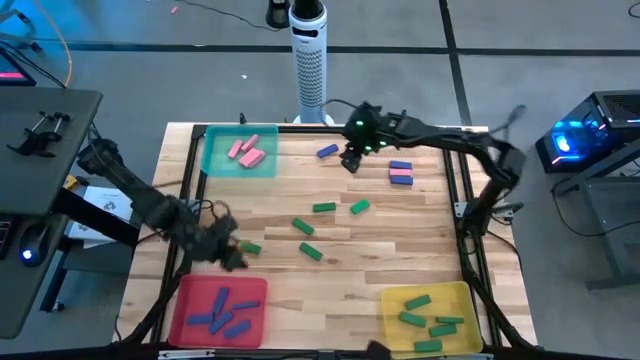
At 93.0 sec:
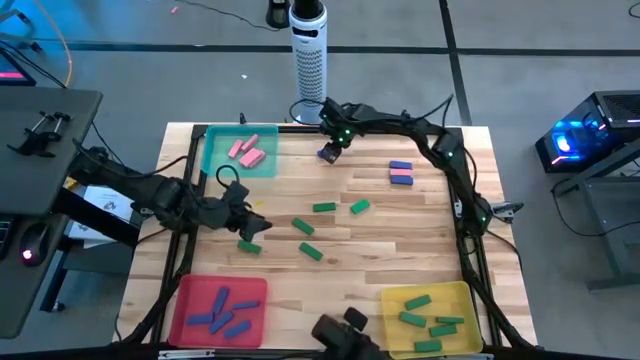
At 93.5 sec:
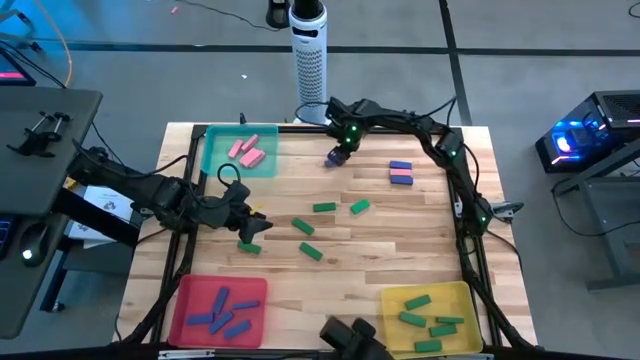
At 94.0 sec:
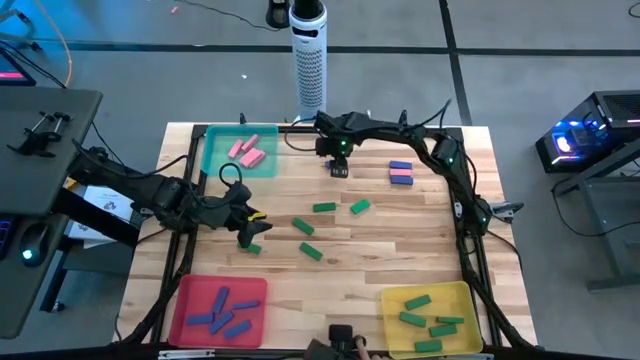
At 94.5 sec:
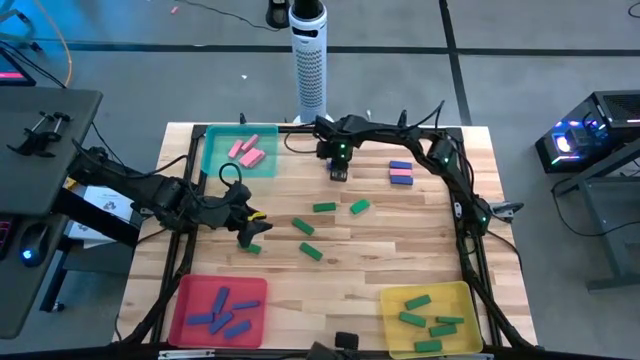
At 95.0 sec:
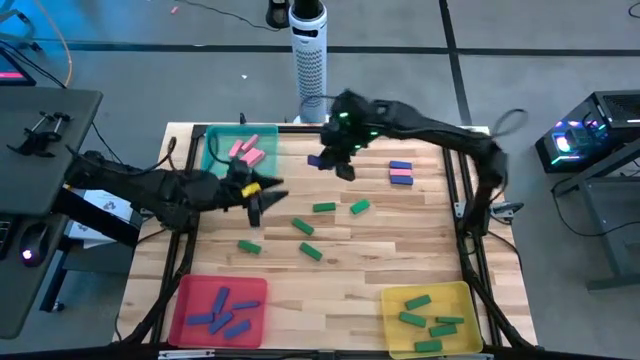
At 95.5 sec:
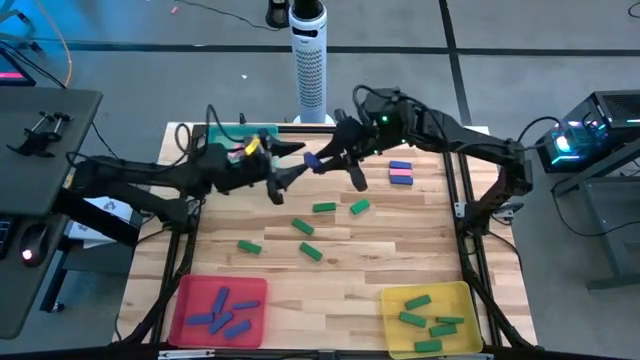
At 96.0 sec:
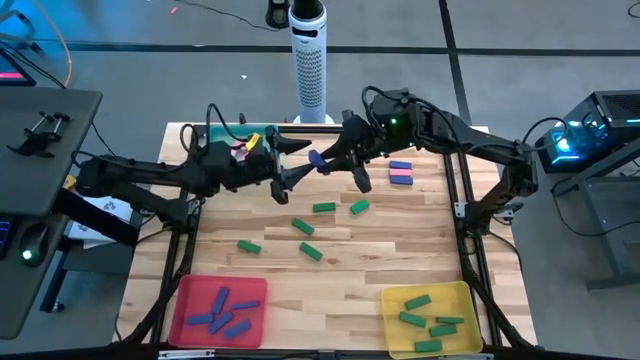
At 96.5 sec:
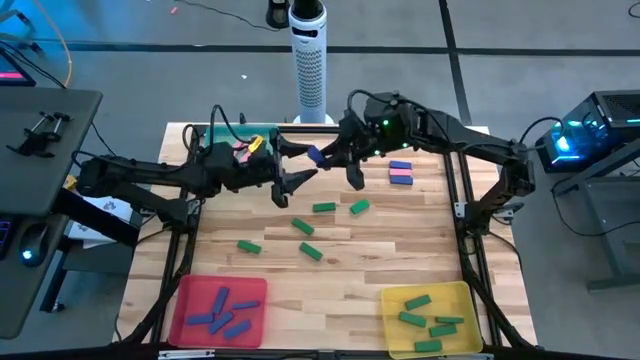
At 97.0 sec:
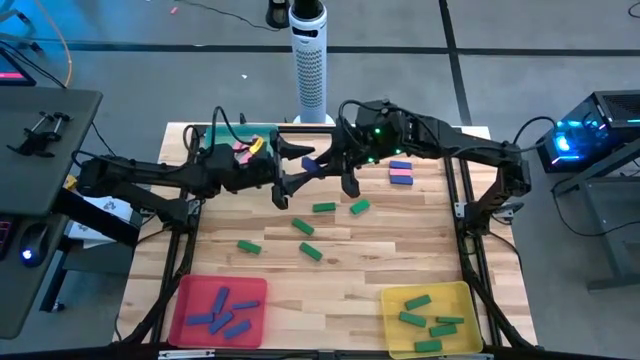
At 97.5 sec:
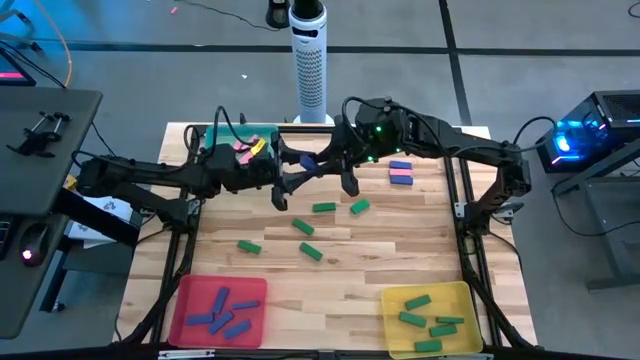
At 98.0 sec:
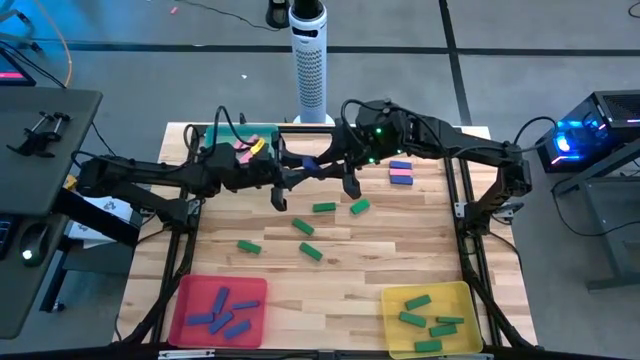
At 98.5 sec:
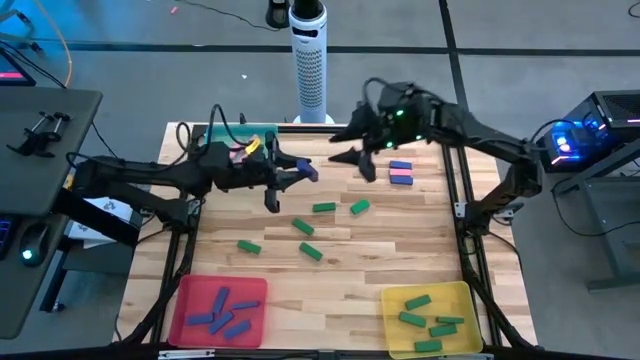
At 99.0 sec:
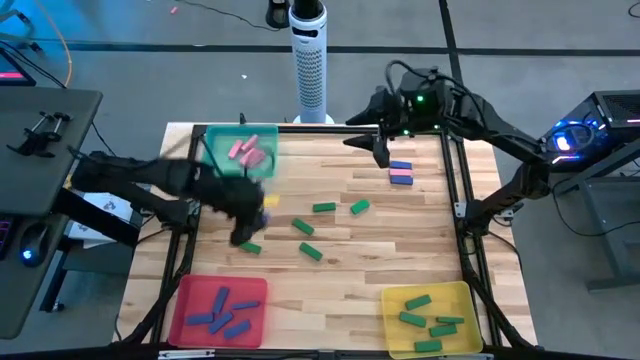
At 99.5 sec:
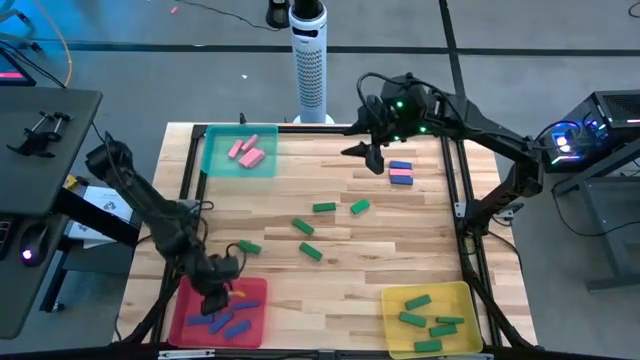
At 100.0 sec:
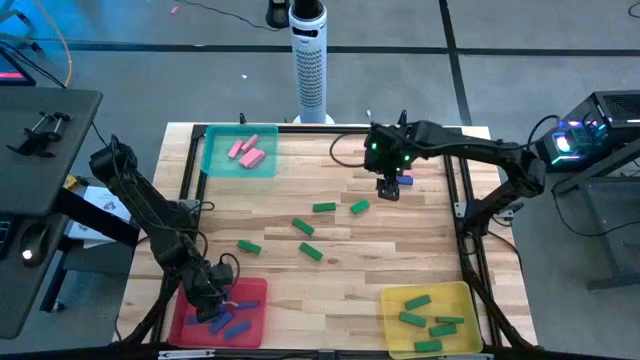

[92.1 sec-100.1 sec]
Task: Sort blocks
Put the blue block into the red bin

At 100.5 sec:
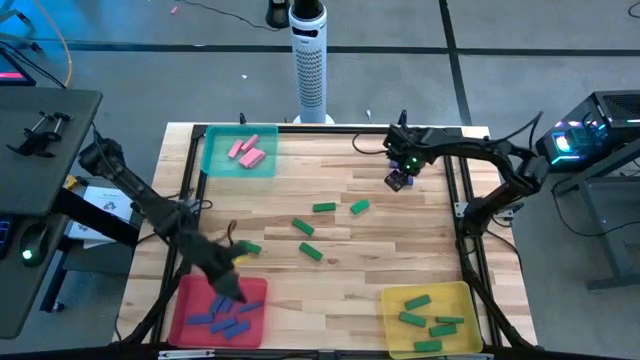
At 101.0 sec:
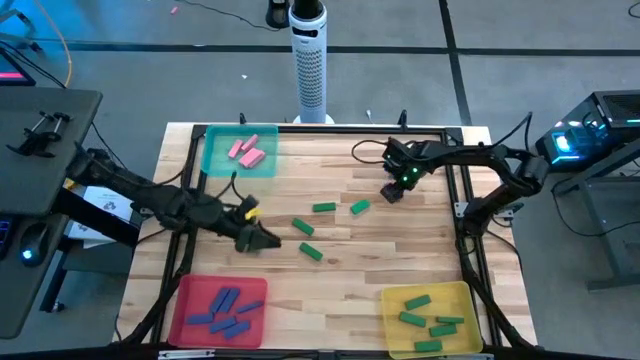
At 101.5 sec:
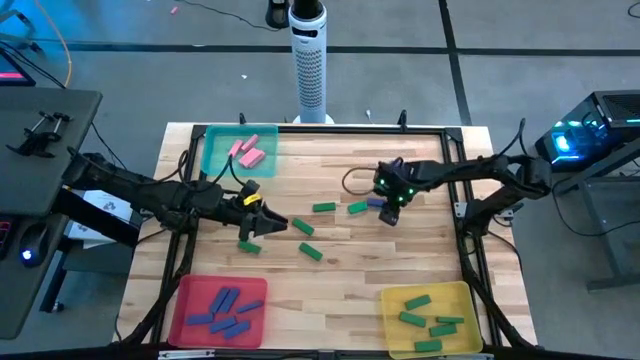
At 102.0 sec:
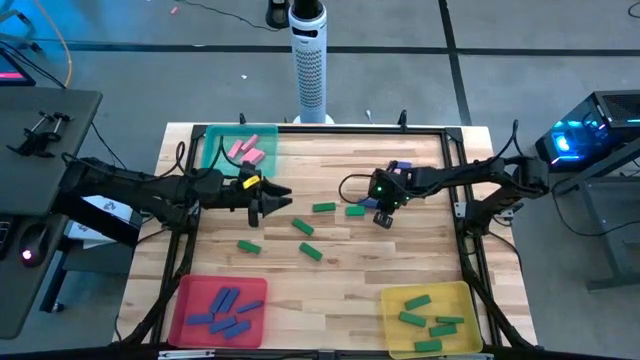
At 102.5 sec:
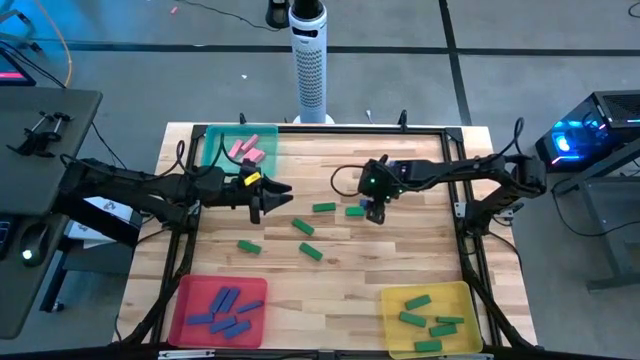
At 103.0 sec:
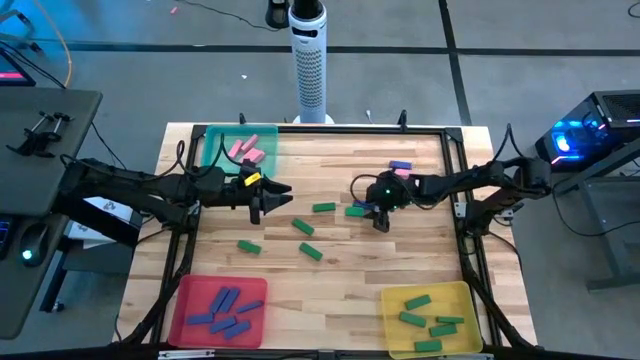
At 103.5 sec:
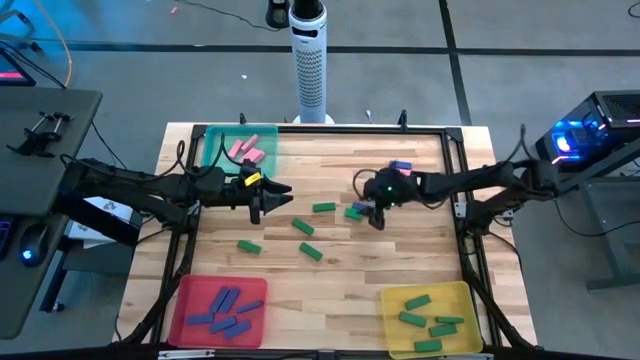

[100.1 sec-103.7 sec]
Put the blue block into the red bin

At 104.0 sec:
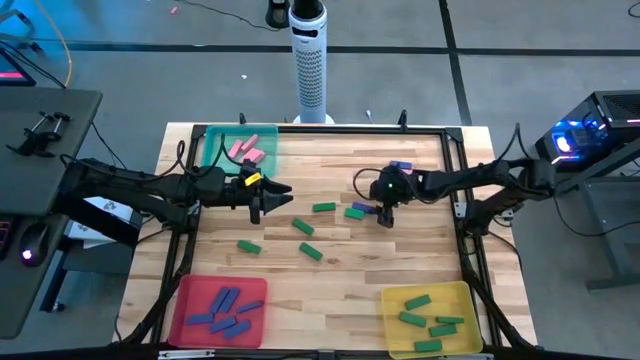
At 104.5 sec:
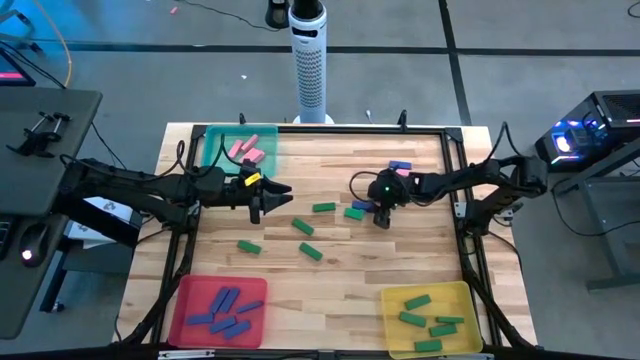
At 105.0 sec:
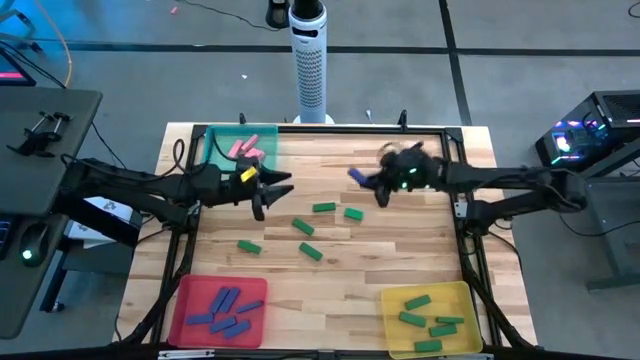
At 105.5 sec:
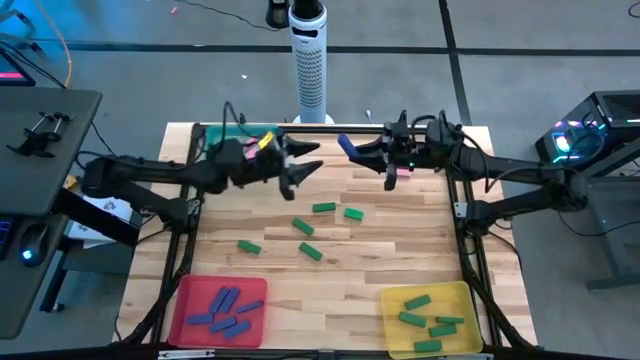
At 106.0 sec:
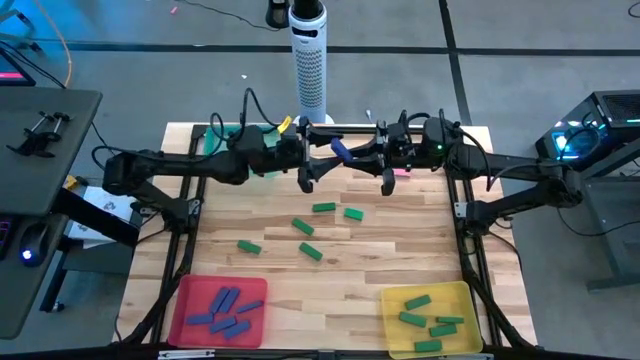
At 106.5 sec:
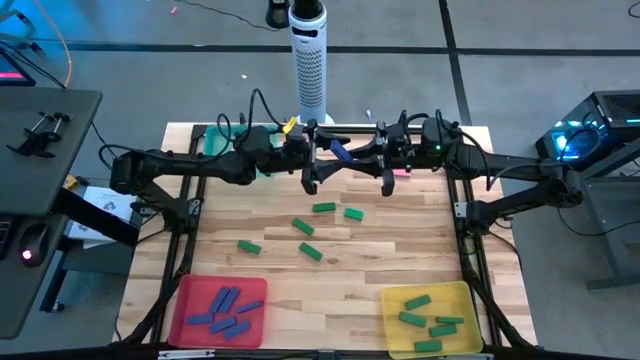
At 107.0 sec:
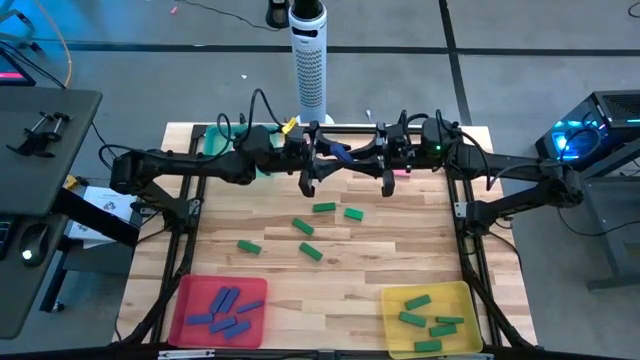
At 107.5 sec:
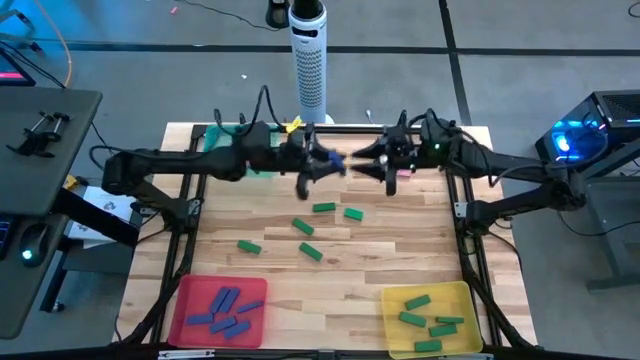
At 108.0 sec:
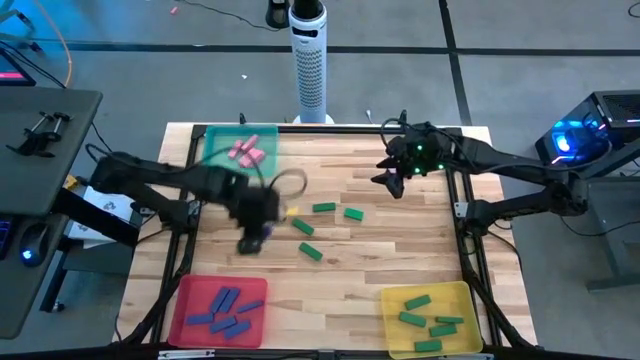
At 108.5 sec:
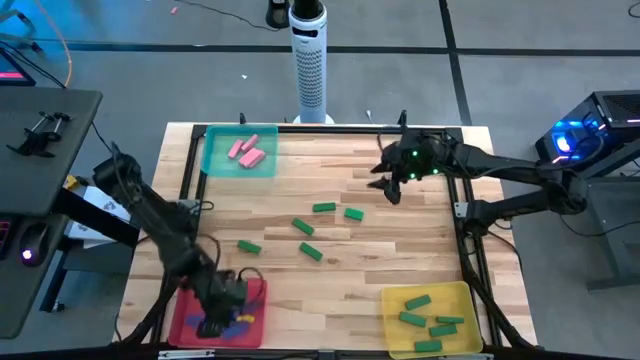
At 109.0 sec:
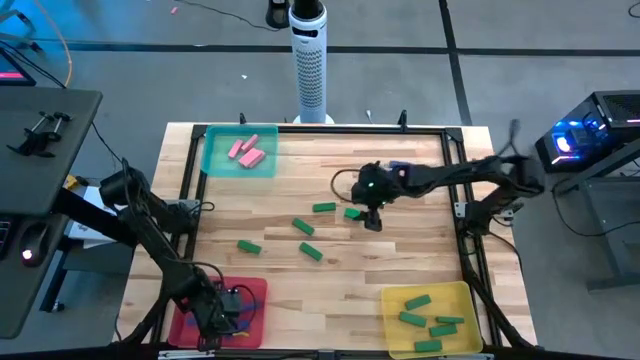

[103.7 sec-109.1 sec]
Put the blue block into the red bin

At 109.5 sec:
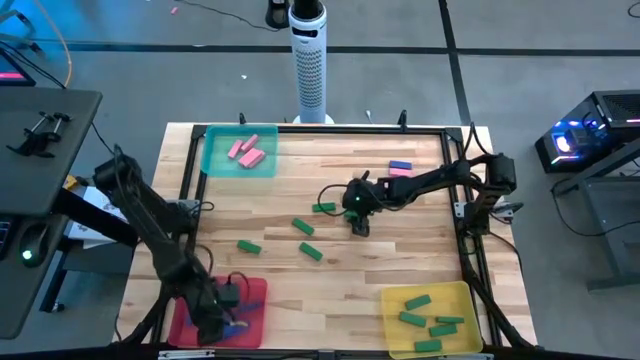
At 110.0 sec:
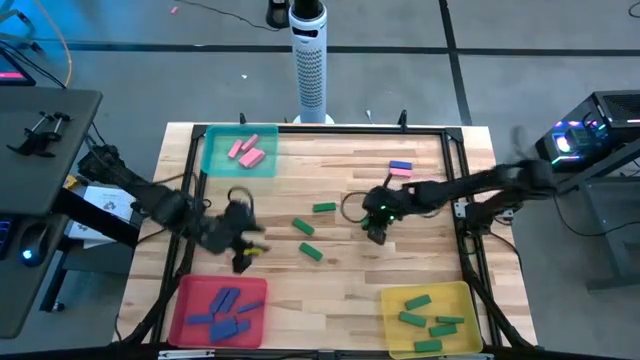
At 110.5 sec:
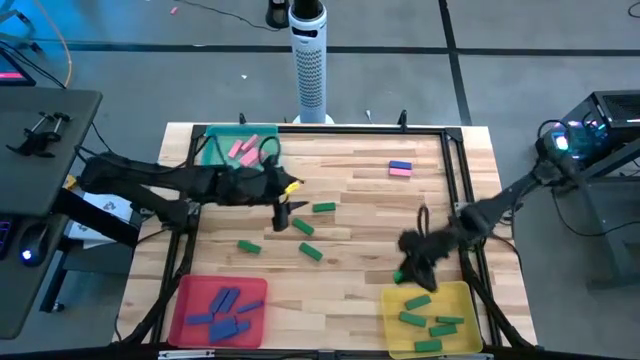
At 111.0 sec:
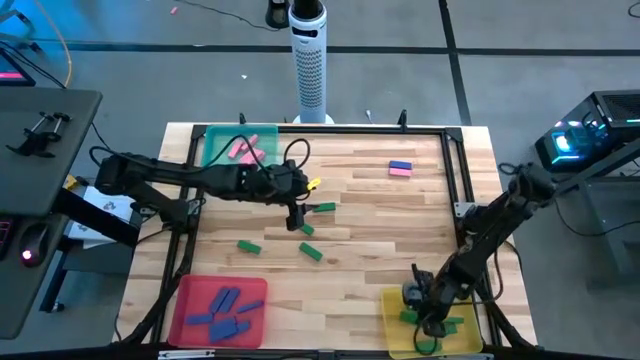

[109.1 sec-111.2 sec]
Put the green block into the yellow bin

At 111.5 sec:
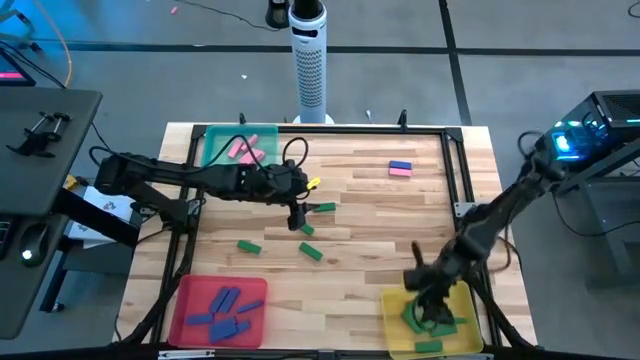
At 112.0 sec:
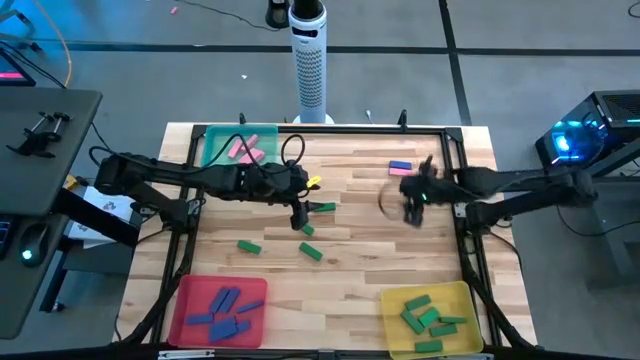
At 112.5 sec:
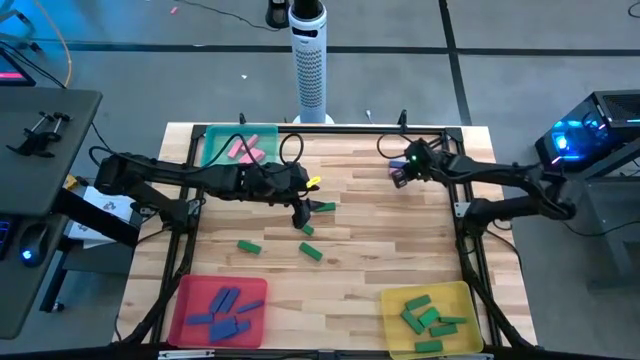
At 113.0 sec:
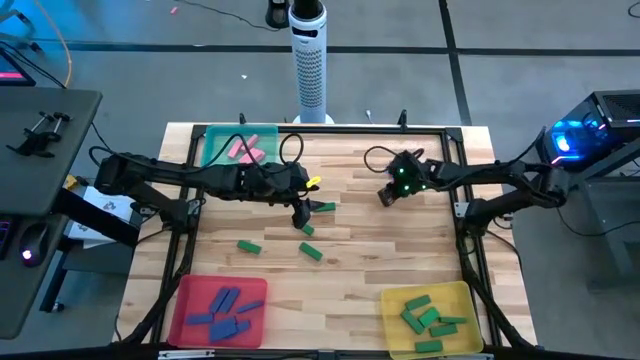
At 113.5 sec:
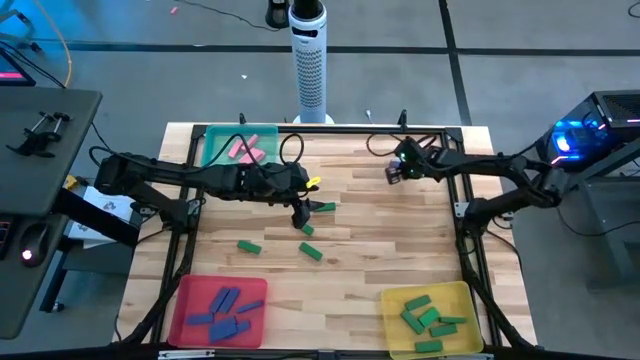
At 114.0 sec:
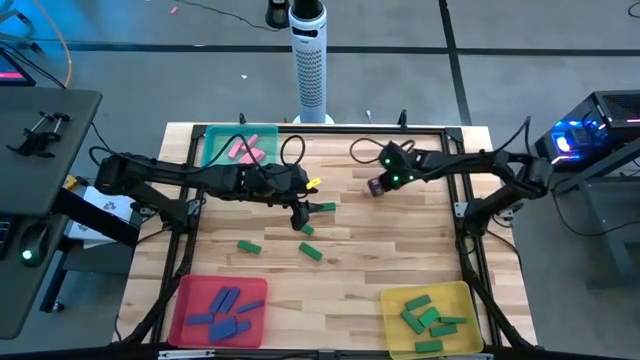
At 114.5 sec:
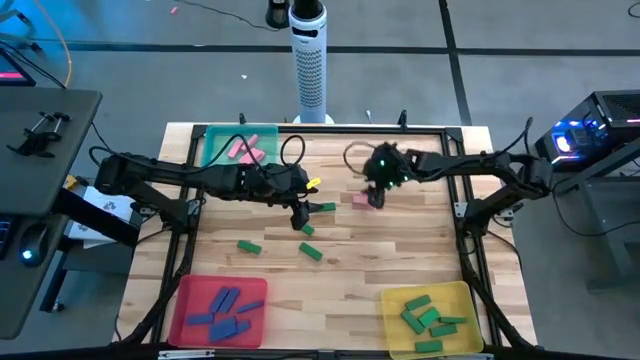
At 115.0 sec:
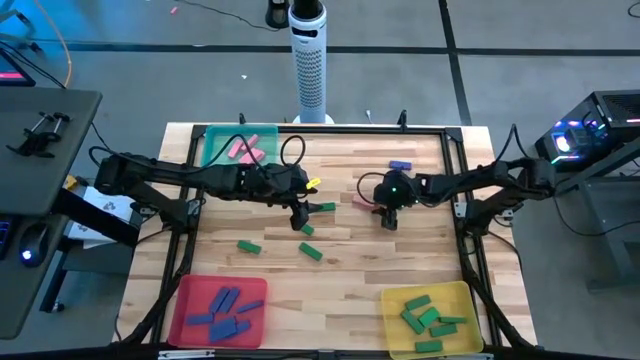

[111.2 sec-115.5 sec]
Put the pink block into the green bin
